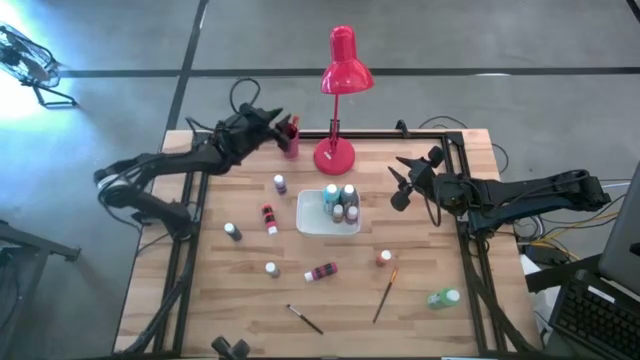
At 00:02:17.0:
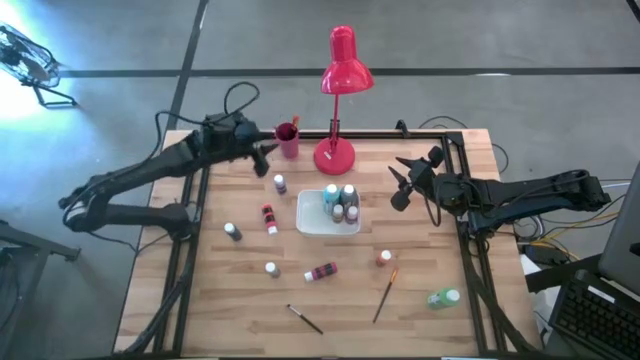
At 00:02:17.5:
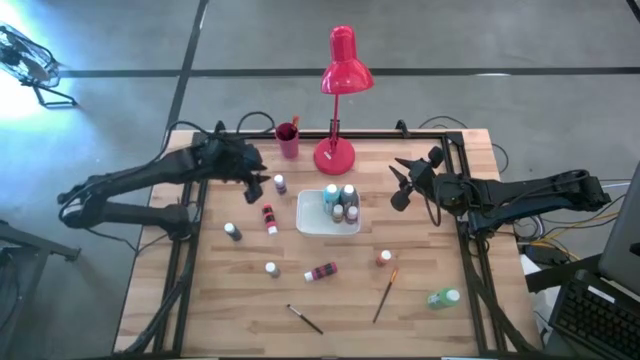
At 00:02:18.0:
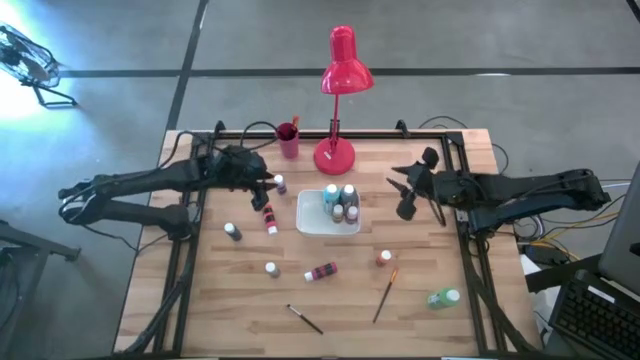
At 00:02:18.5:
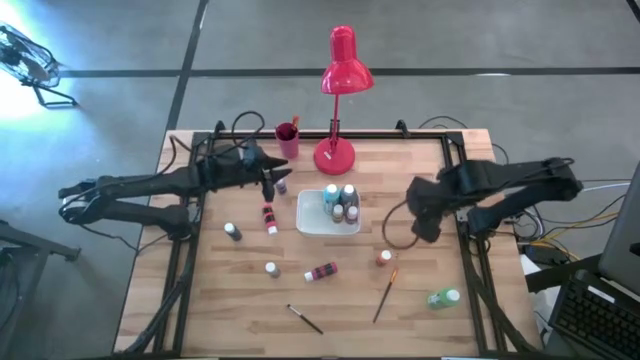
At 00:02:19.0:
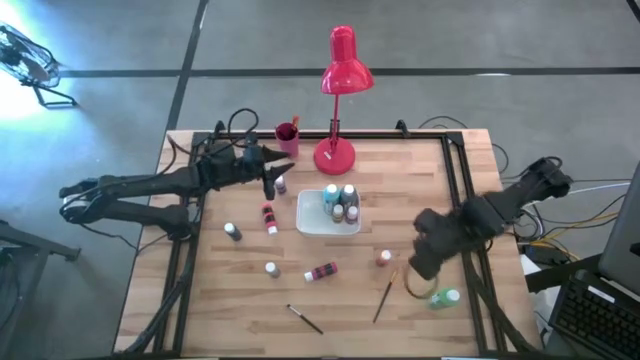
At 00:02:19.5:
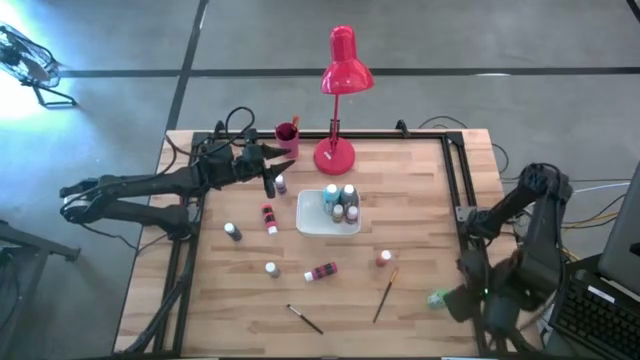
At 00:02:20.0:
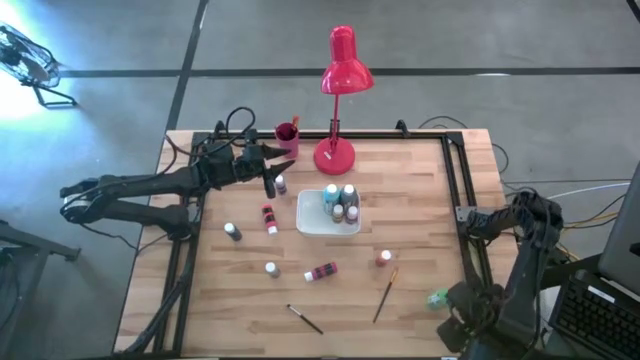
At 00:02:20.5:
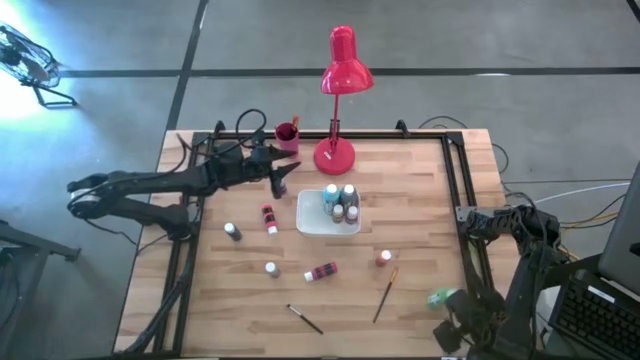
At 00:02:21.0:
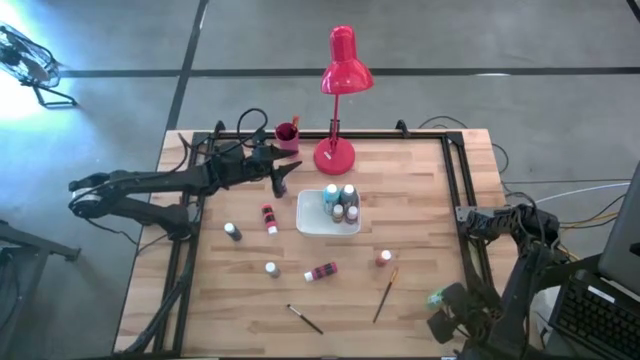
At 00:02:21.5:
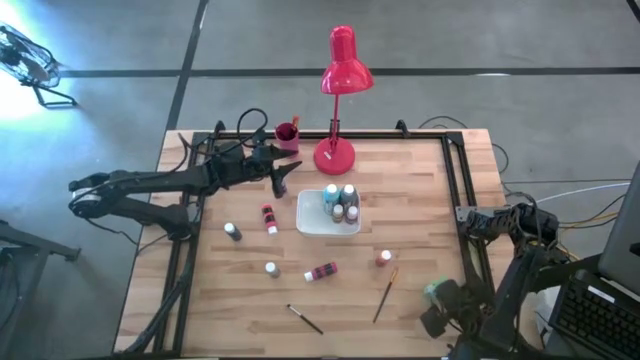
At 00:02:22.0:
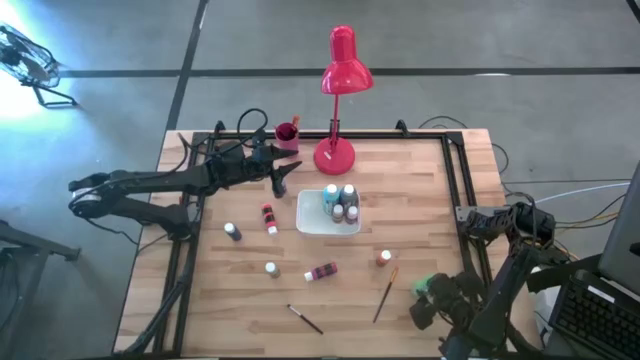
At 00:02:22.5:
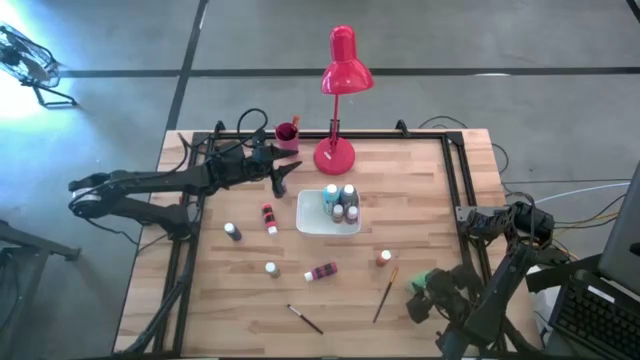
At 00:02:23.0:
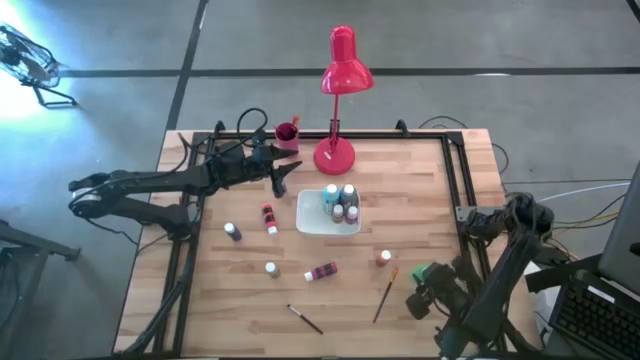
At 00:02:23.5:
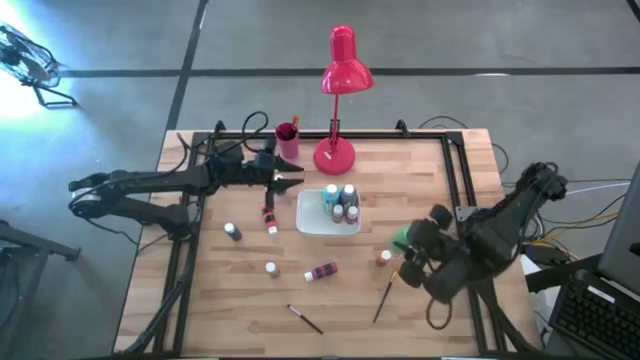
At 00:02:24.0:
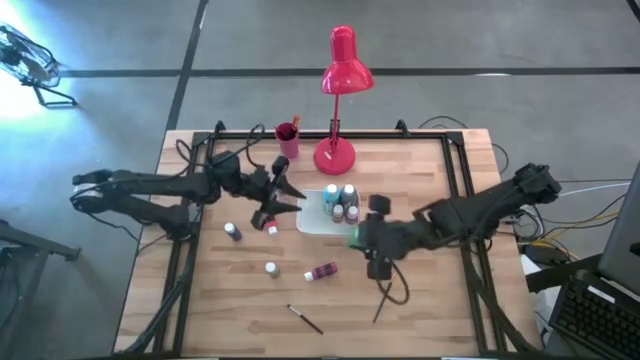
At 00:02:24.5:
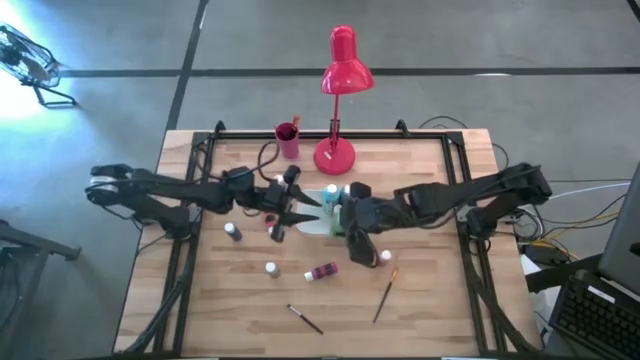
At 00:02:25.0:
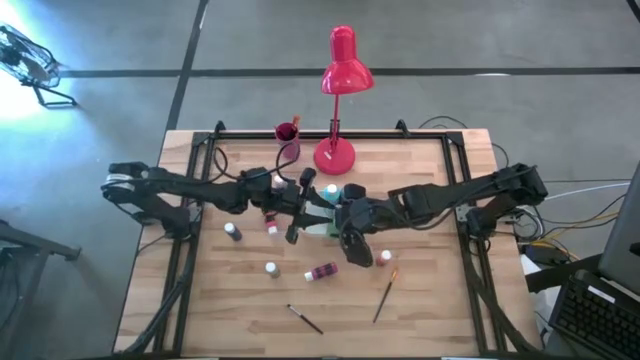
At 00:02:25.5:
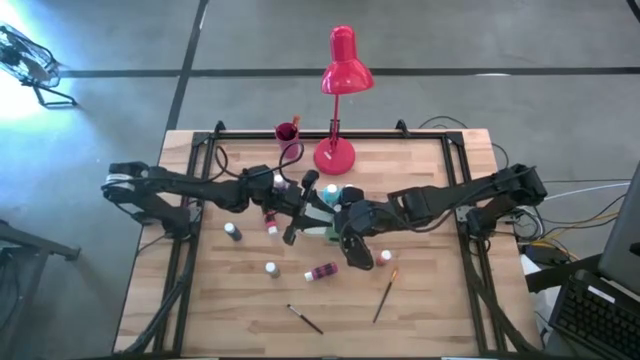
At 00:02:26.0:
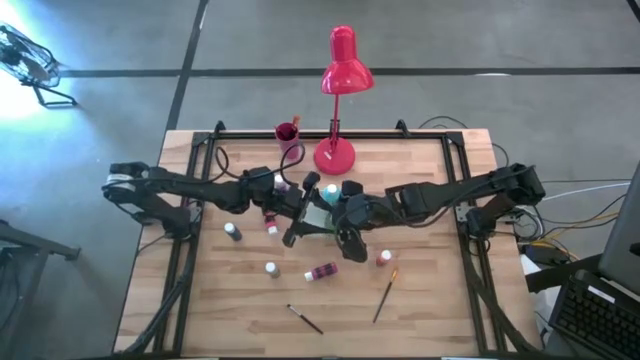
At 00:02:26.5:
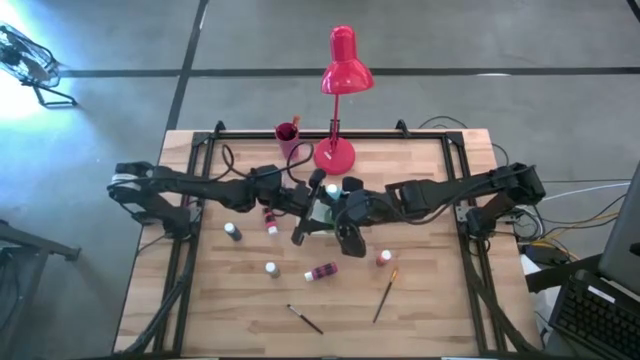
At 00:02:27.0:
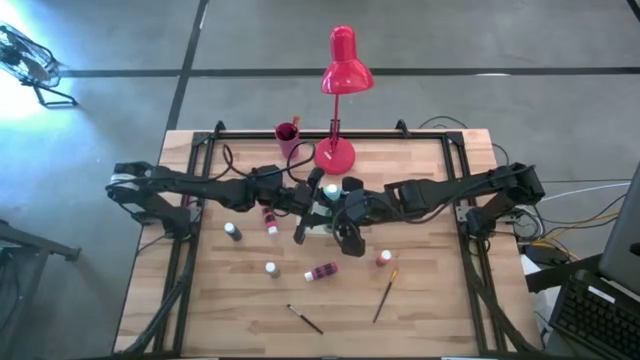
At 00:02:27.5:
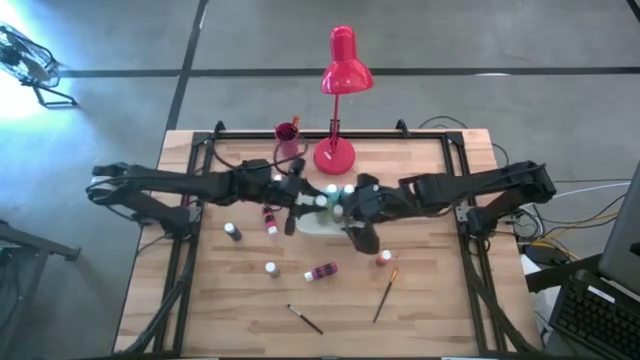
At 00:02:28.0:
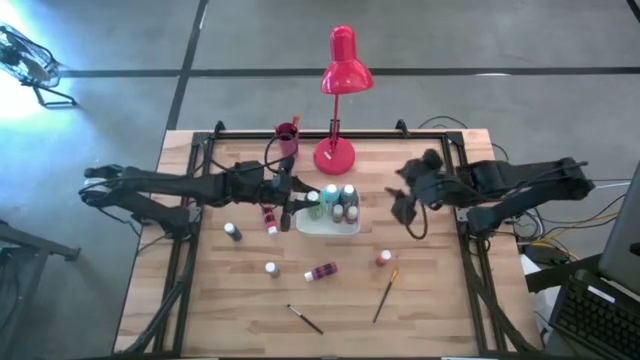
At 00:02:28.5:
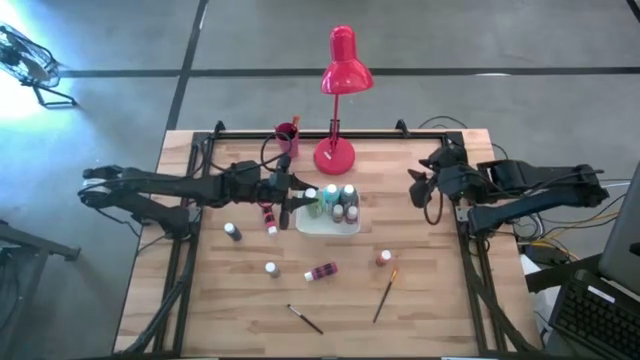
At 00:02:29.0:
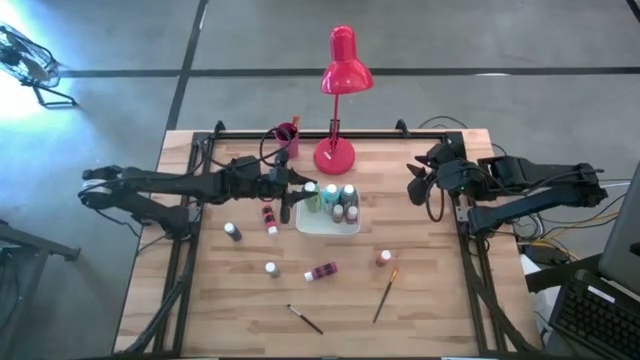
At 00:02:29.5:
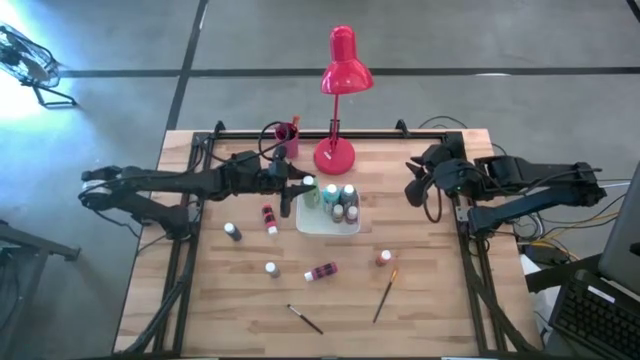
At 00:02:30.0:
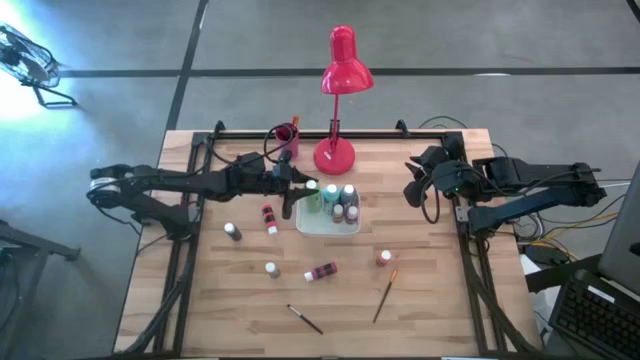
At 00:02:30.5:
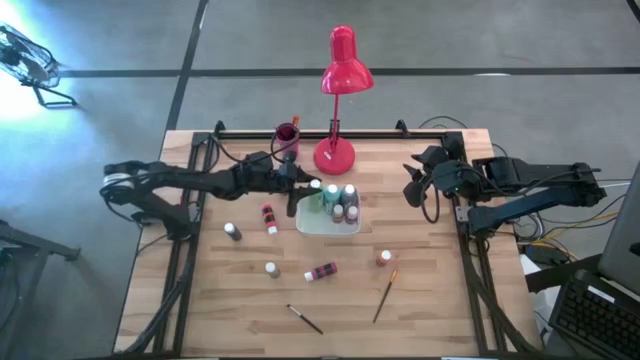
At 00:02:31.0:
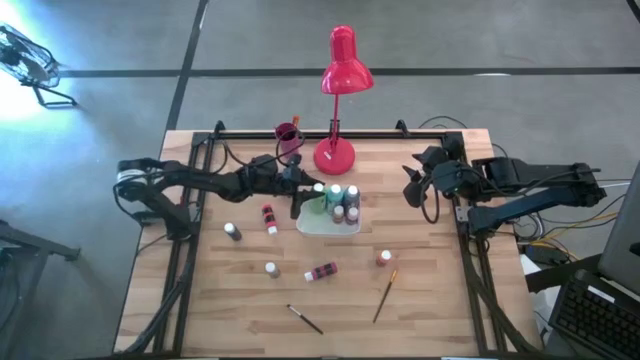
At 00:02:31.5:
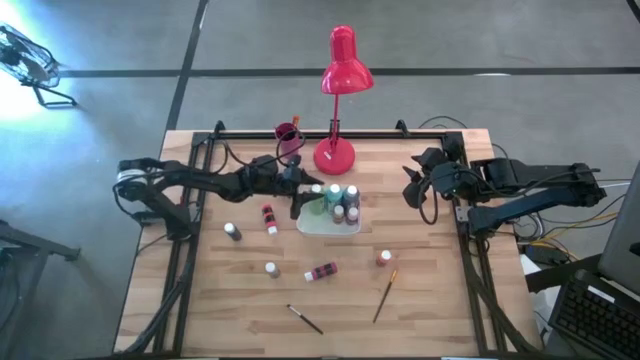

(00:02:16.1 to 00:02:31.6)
Task: Pick & Place Paint Supplies
Put the green paint bottle into the white bin

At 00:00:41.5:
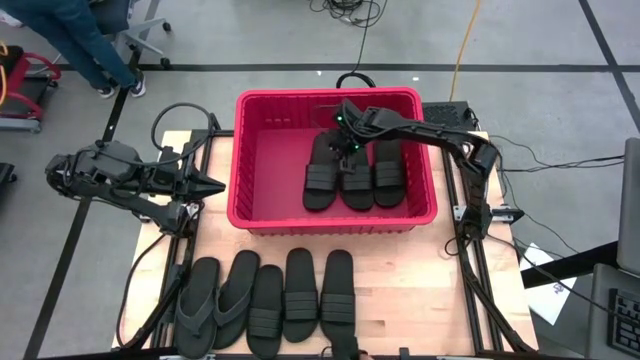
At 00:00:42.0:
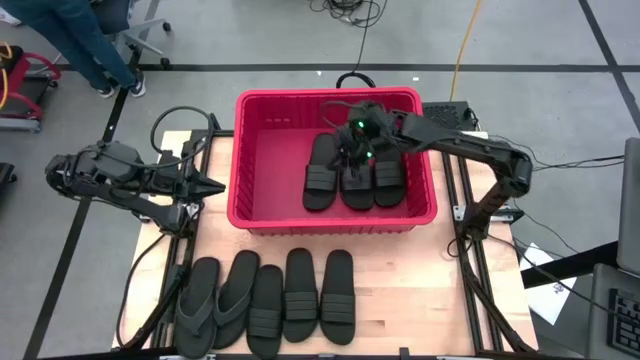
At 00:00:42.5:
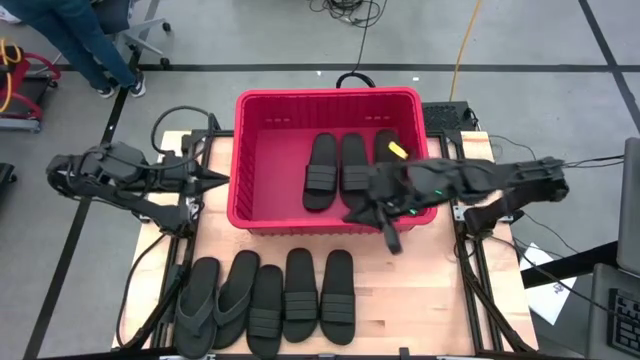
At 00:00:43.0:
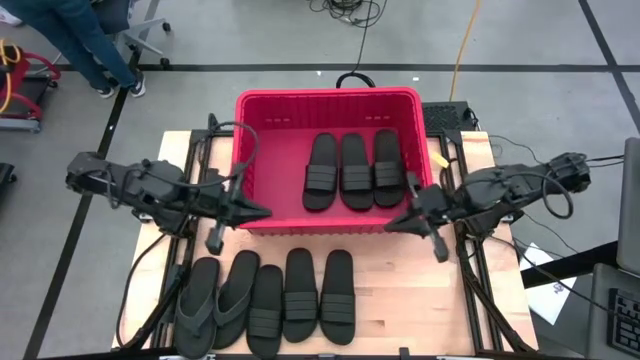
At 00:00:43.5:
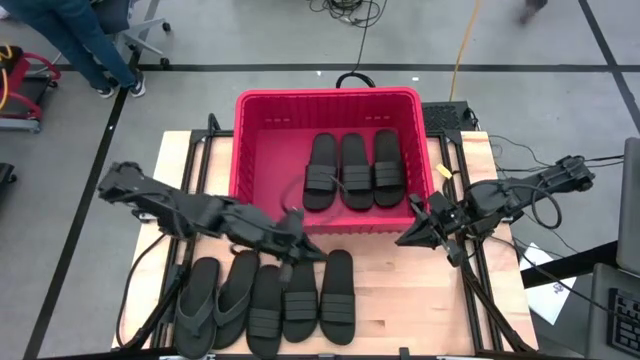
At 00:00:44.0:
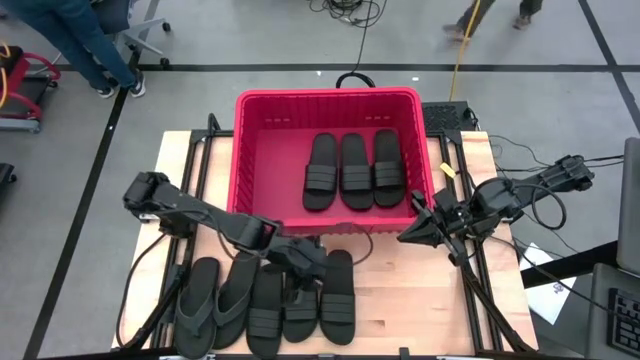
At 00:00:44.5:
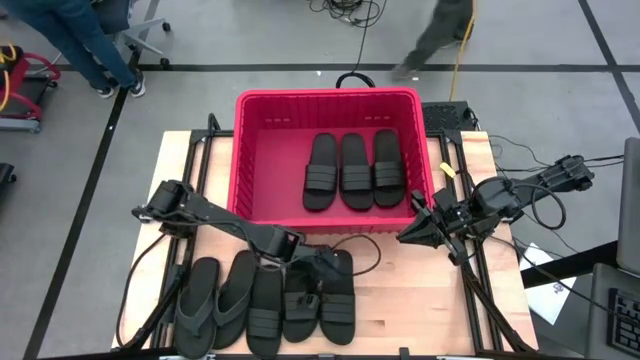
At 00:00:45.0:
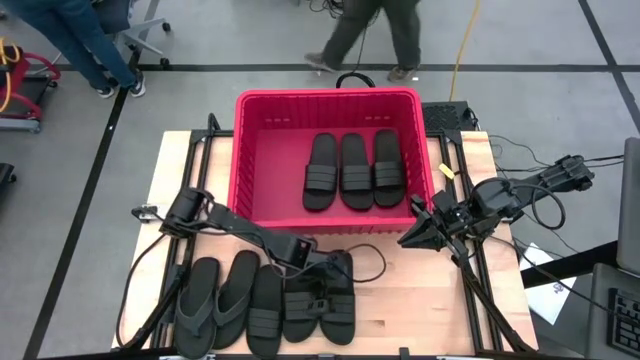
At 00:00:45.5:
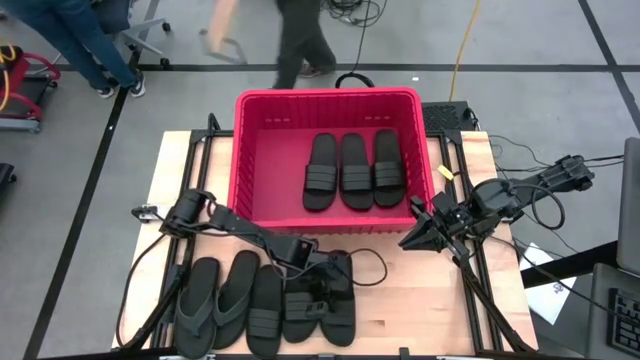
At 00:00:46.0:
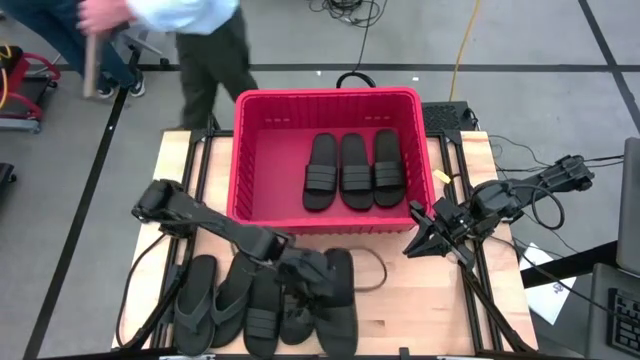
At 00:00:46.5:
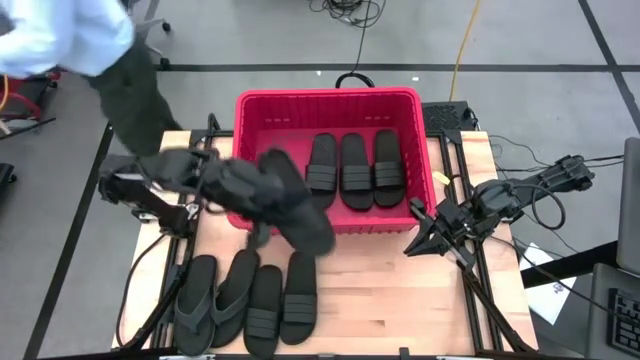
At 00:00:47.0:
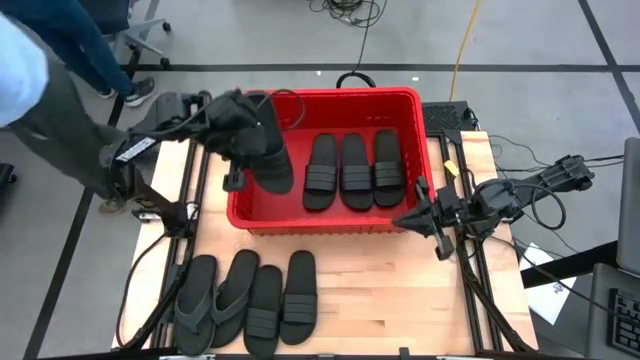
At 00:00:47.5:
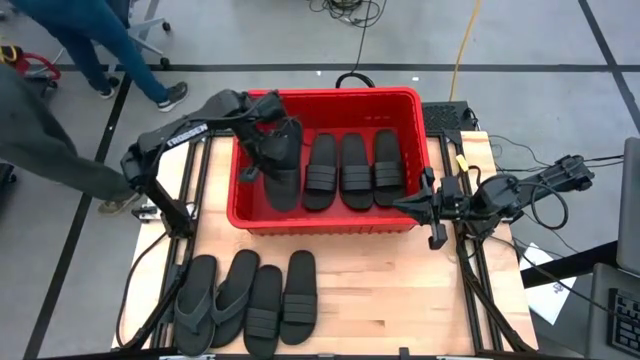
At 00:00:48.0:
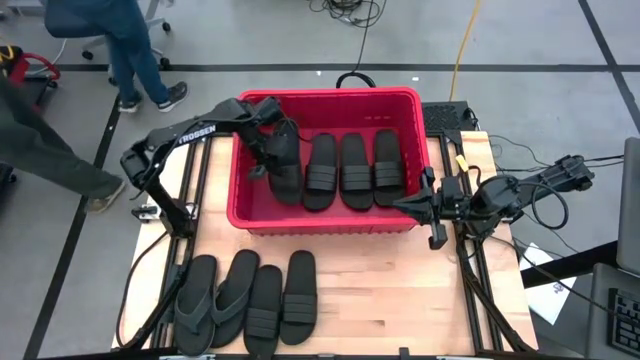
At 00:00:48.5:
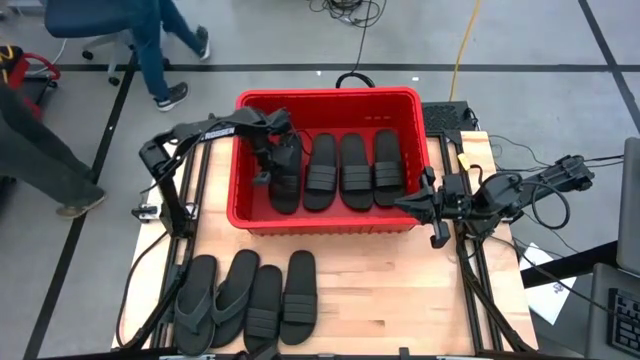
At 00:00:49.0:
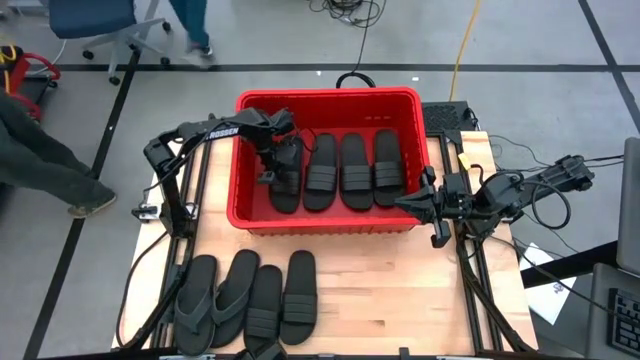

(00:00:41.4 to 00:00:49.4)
Task: Pick and place slides into bin
Put the black slide into the red bin
